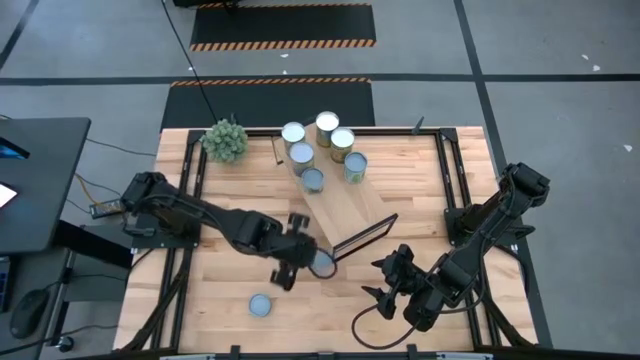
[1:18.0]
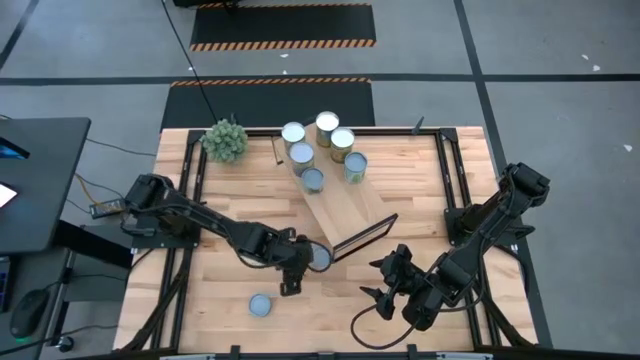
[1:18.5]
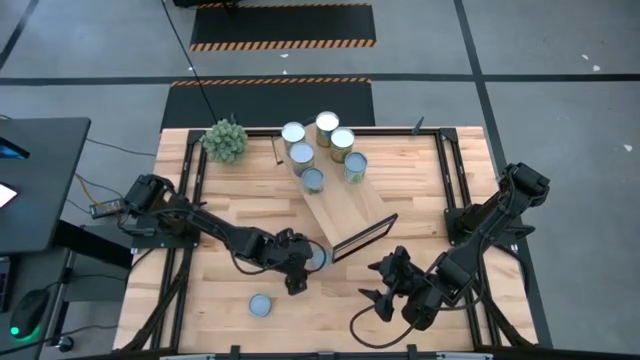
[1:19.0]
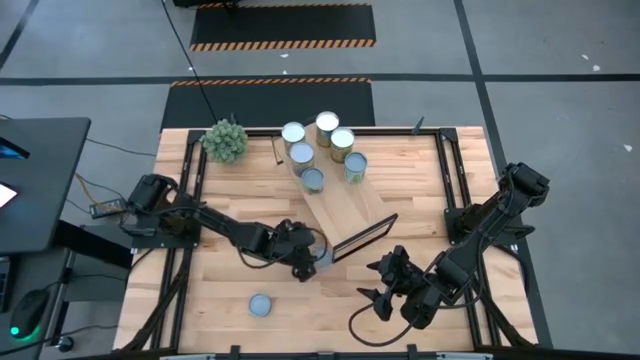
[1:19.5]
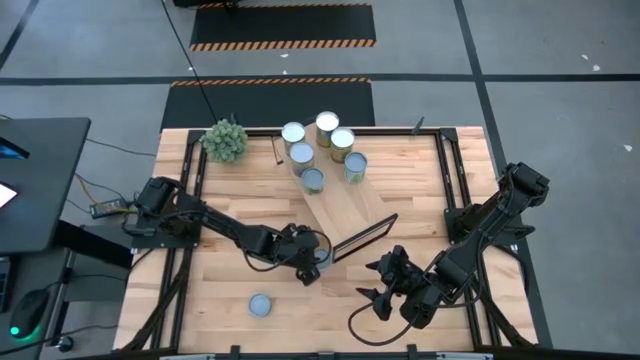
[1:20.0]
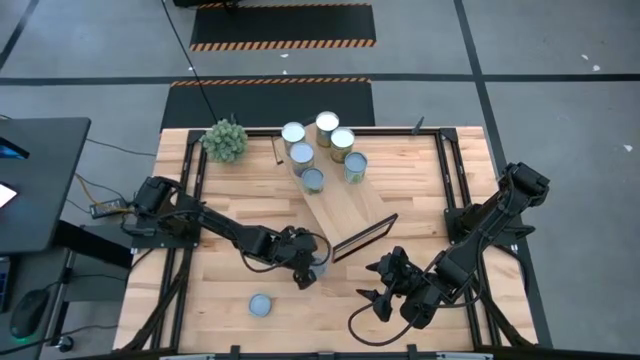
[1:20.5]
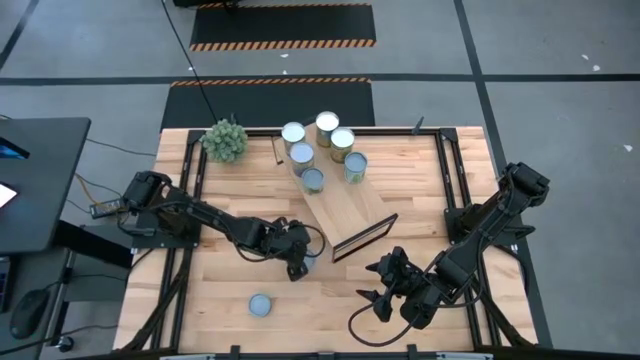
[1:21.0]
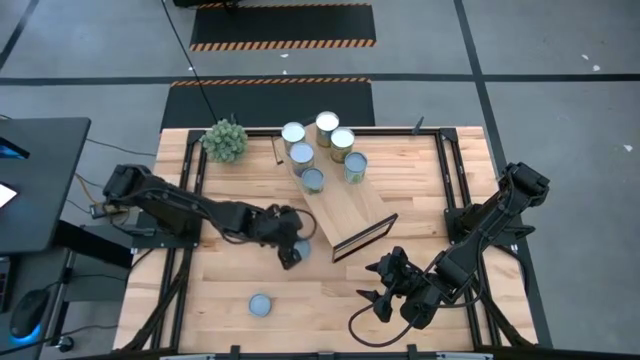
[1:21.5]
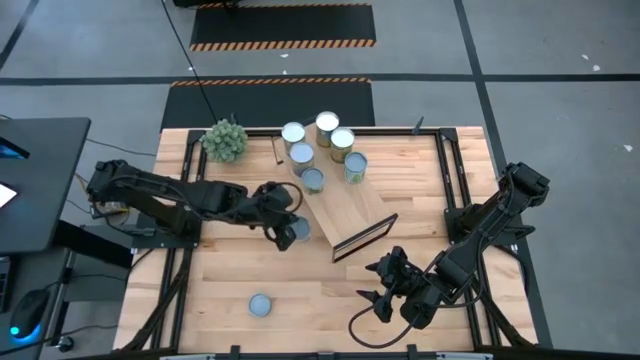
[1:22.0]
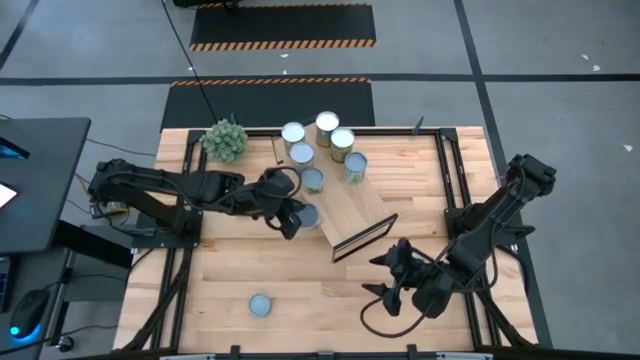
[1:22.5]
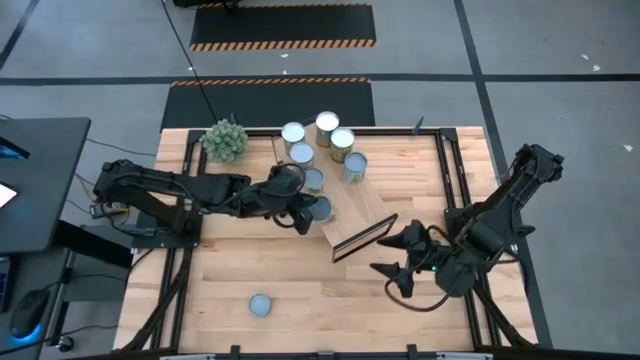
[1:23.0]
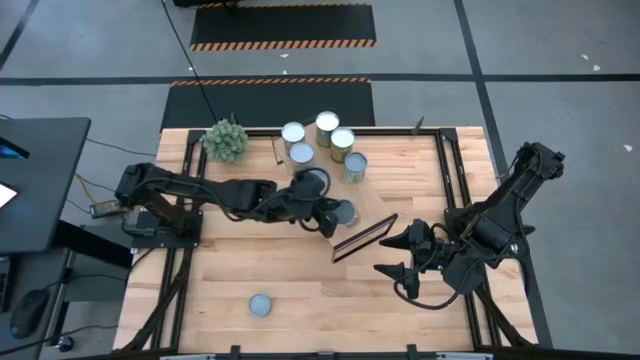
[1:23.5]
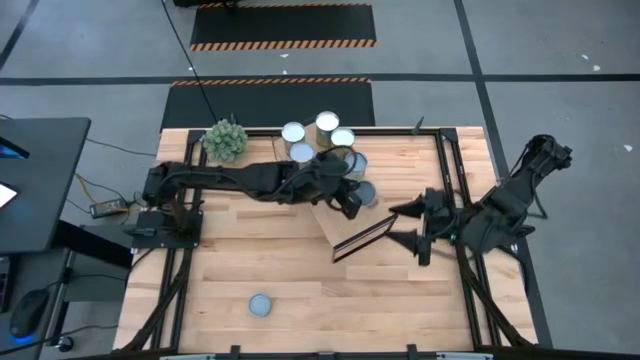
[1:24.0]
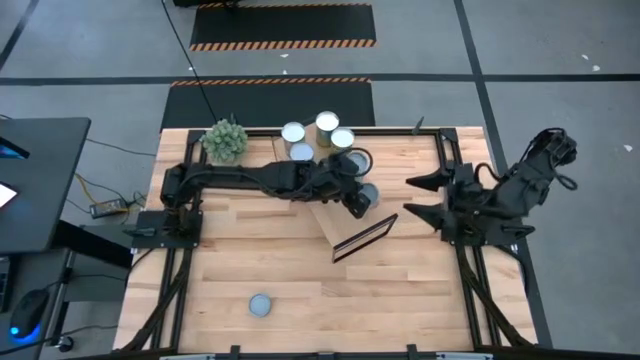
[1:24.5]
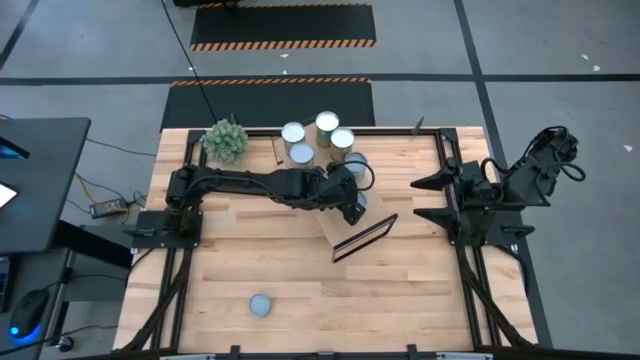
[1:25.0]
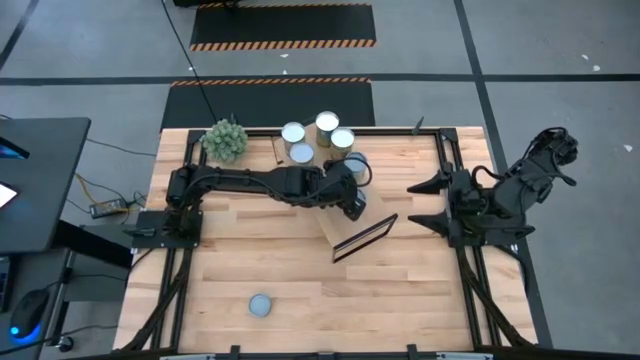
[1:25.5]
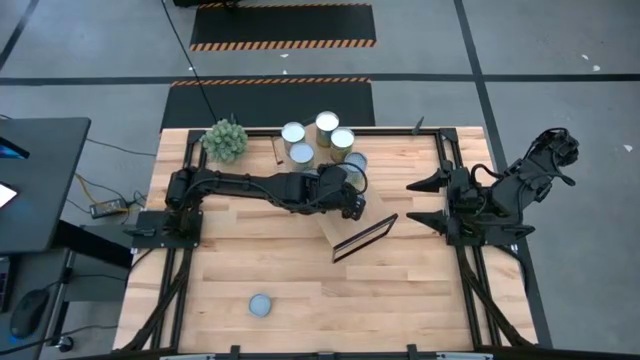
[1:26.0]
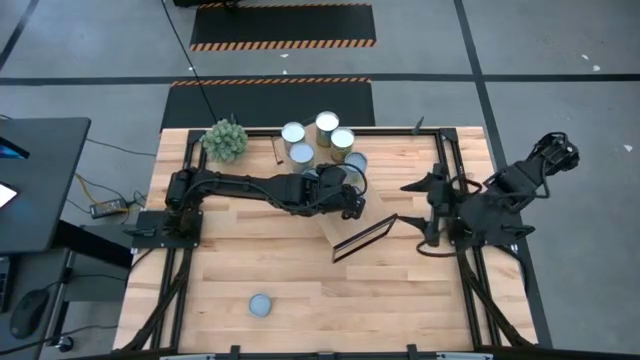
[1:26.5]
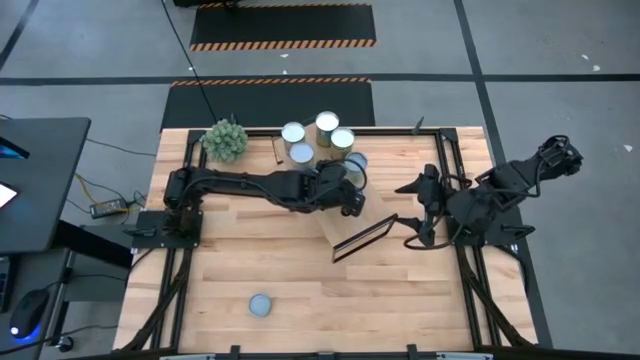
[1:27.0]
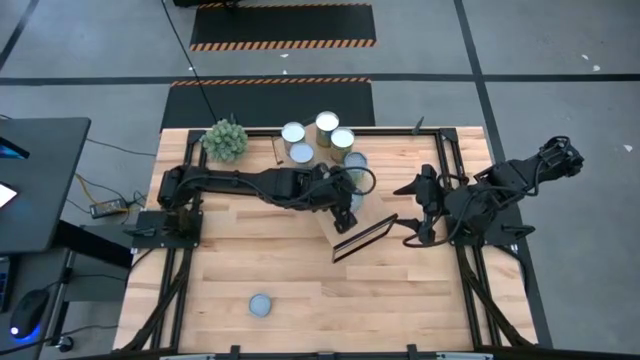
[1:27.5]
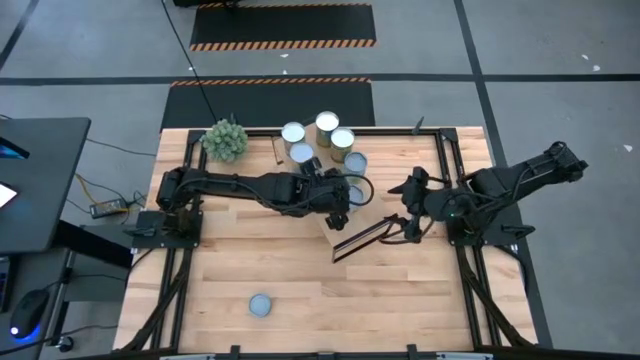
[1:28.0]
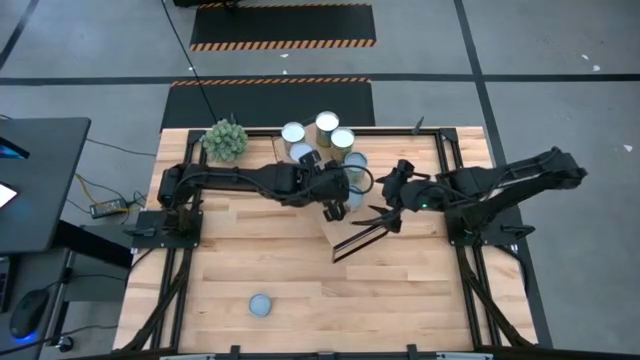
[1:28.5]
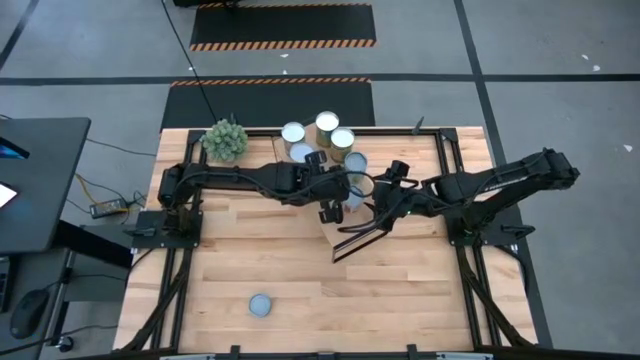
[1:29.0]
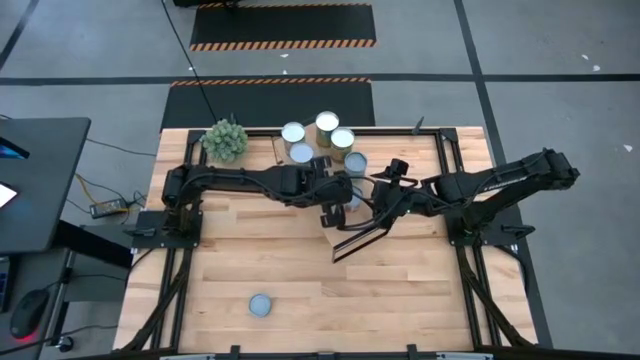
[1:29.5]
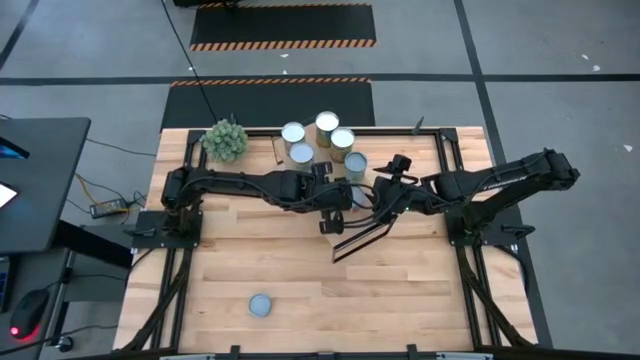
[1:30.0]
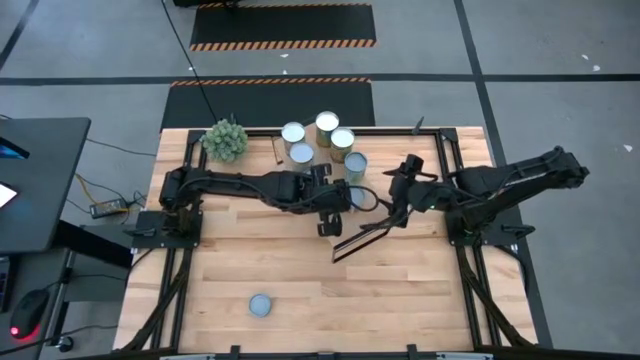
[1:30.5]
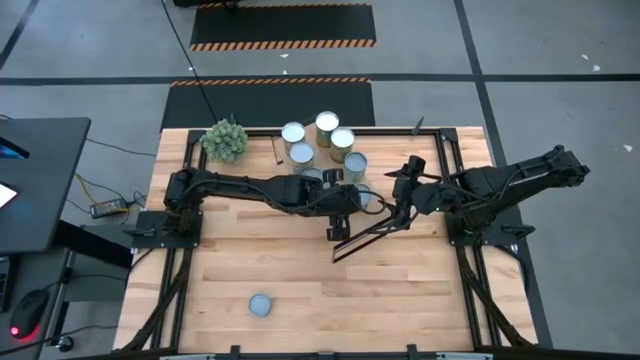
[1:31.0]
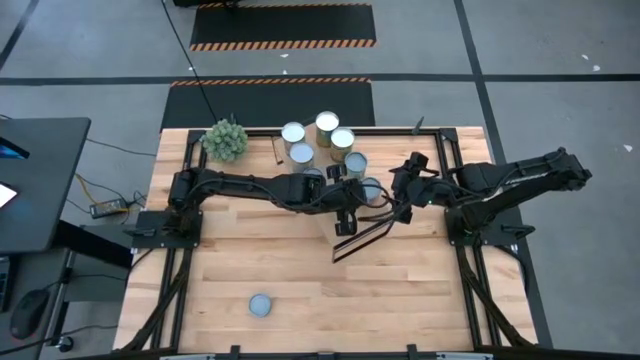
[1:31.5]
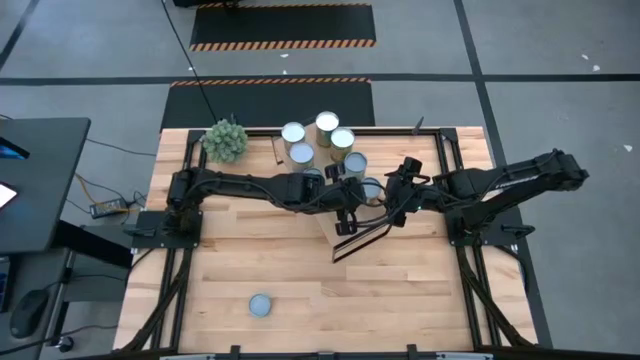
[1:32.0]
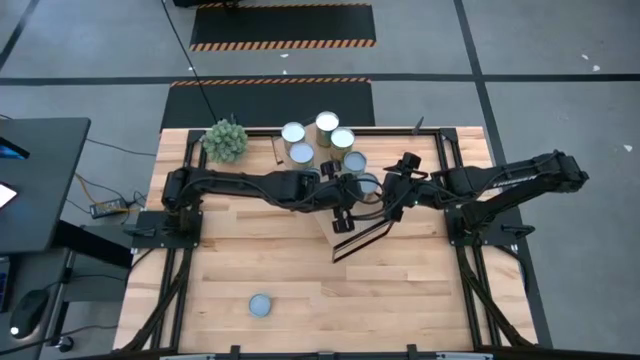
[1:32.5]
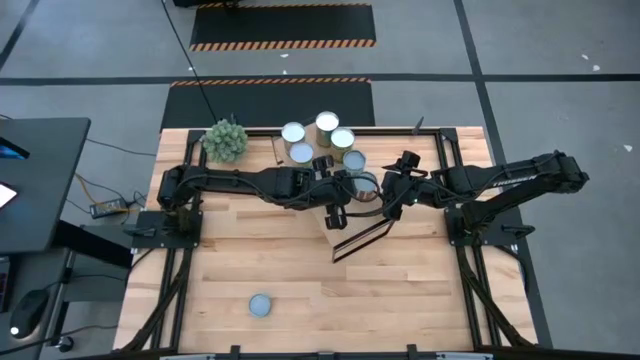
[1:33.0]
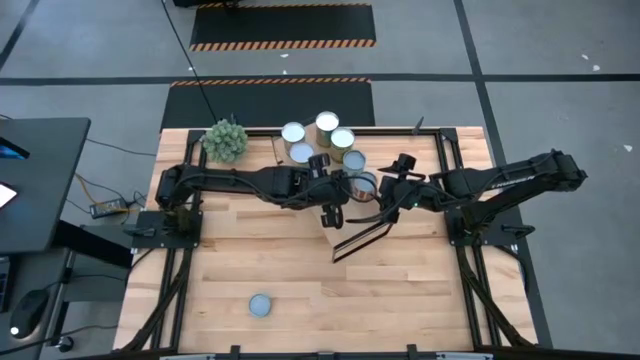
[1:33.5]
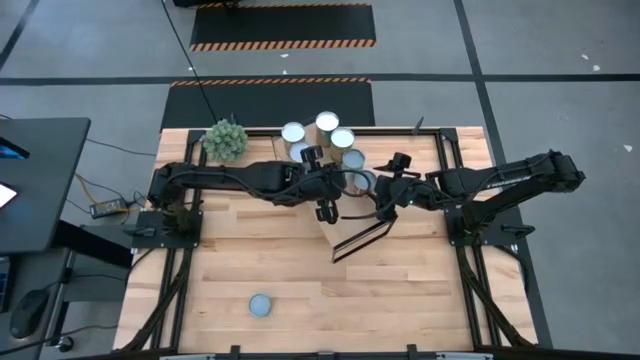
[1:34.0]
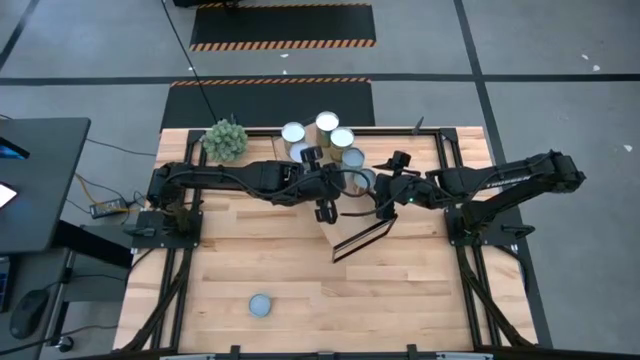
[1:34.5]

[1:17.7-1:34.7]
Task: Pick and place cans onto a shelf
Put the white-pink can on the shelf

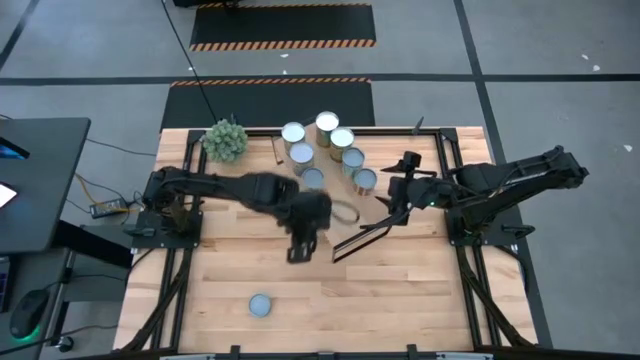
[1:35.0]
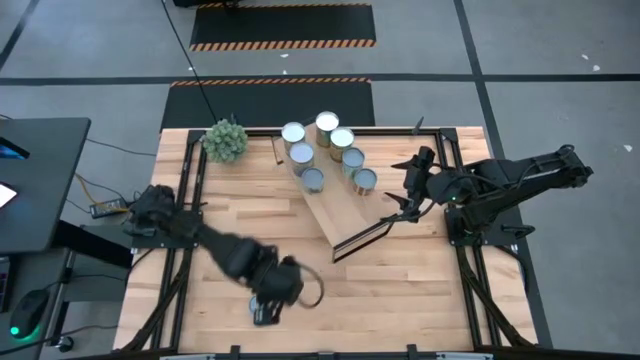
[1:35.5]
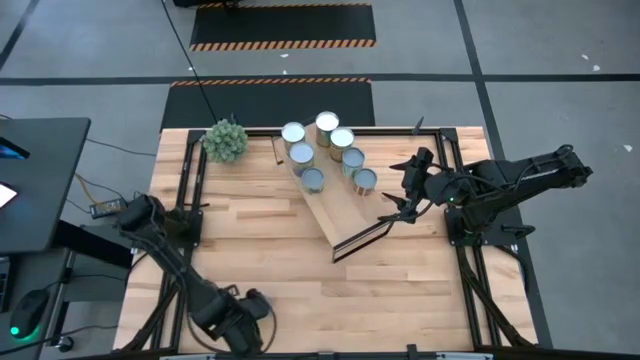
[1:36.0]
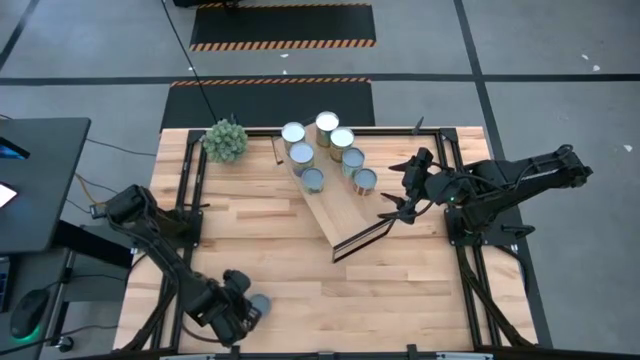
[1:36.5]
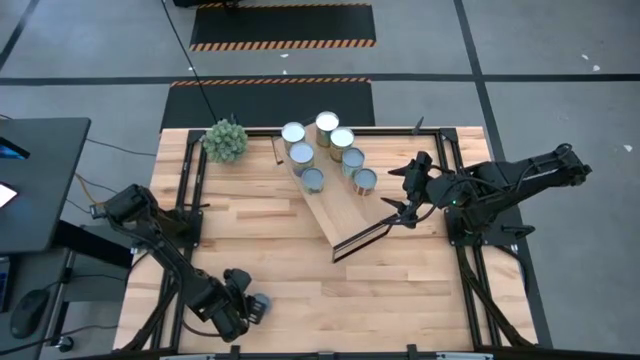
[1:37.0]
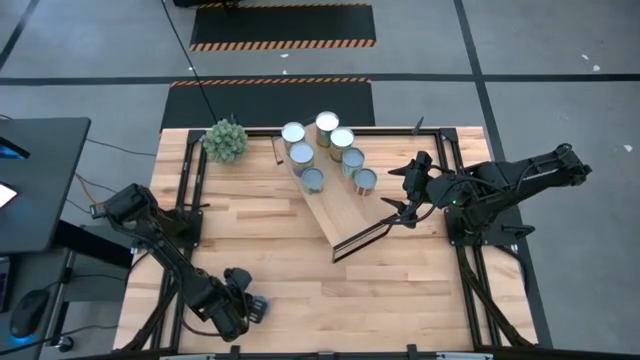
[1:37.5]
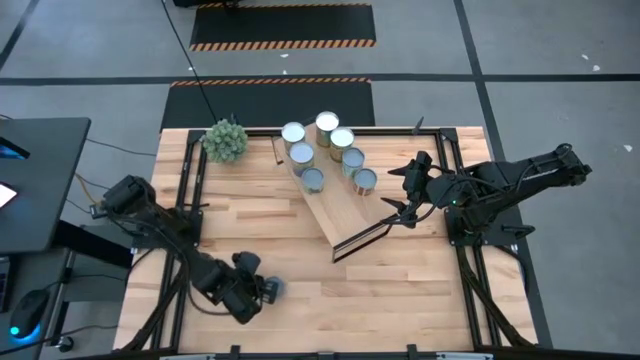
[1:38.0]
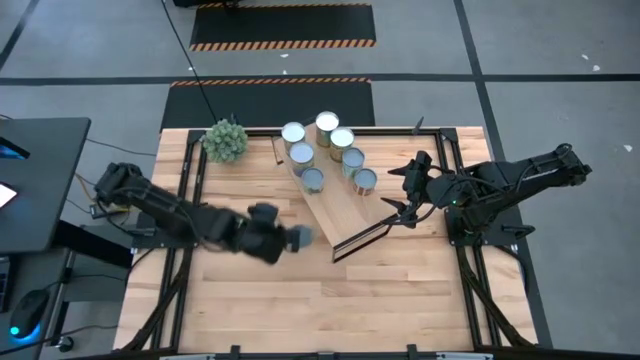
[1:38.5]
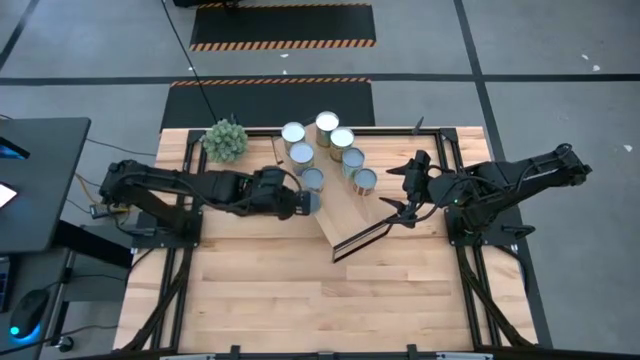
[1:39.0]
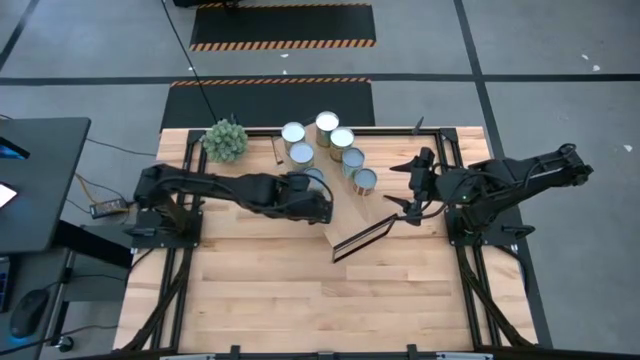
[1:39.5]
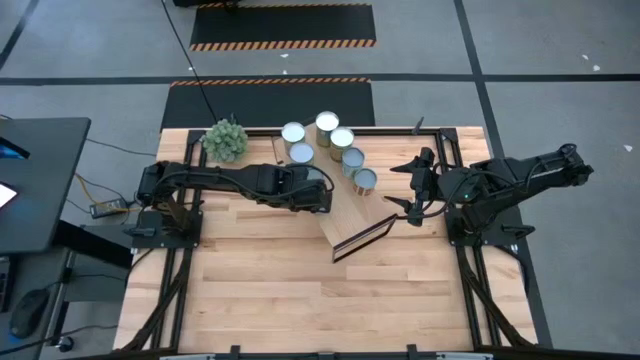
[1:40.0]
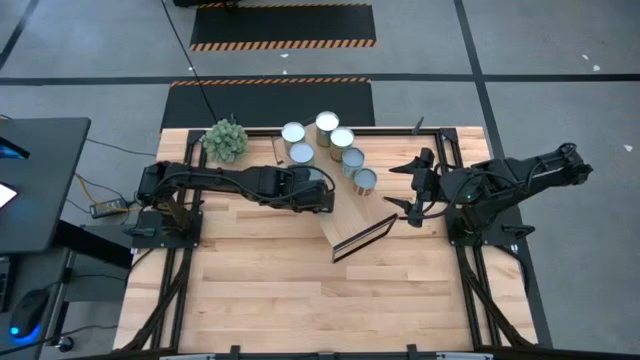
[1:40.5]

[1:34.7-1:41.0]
Put the dark blue can on the shelf
